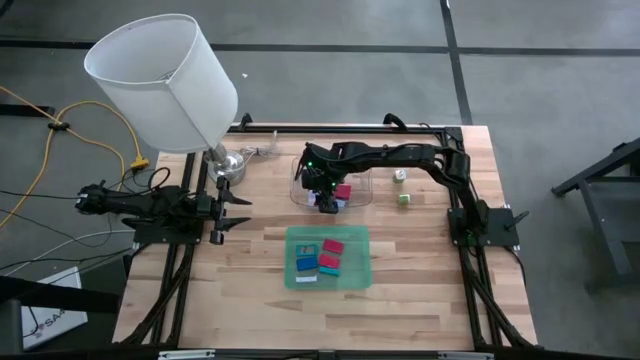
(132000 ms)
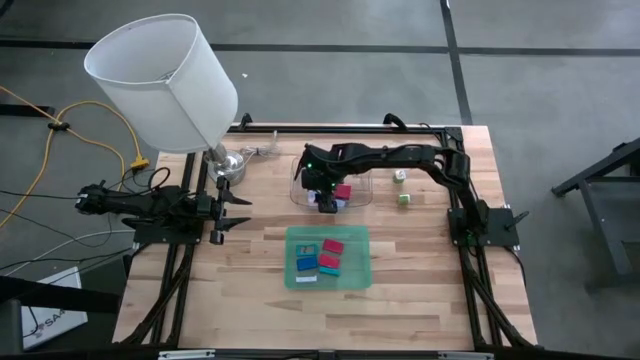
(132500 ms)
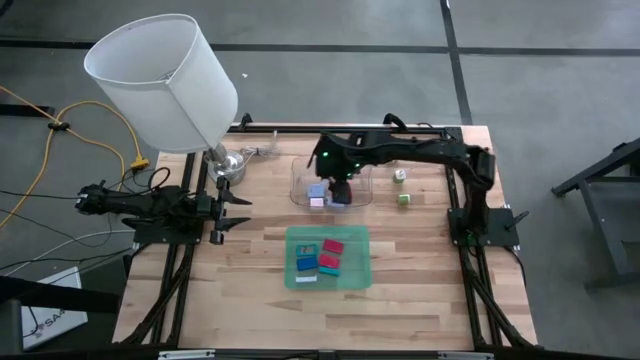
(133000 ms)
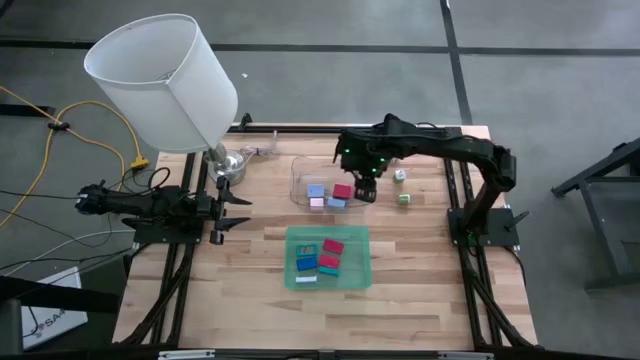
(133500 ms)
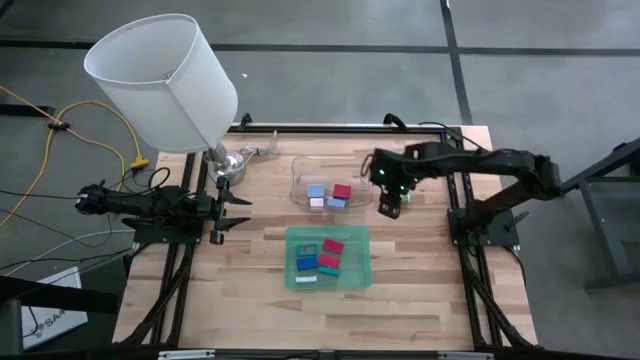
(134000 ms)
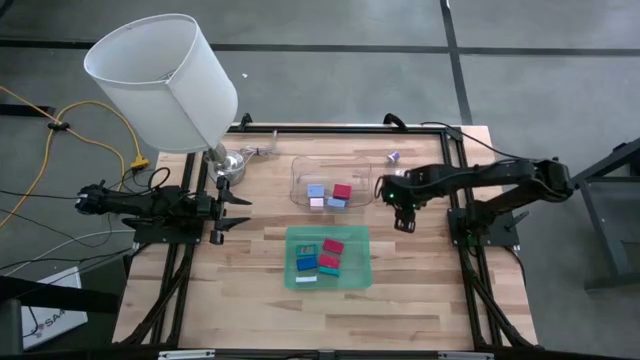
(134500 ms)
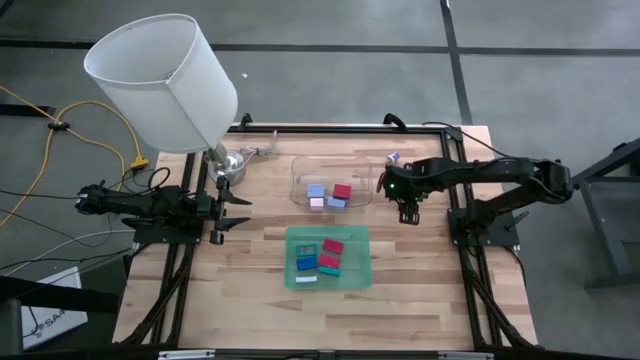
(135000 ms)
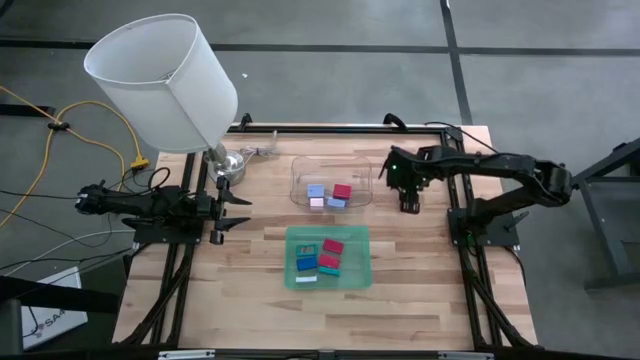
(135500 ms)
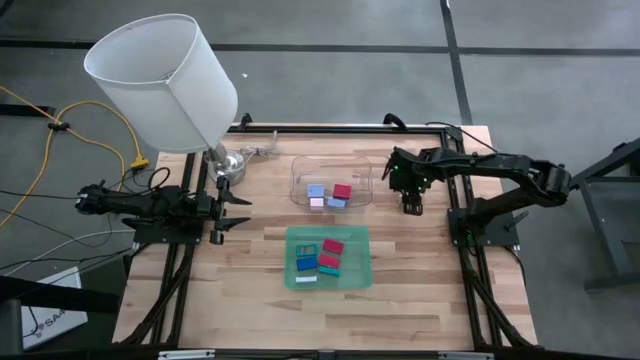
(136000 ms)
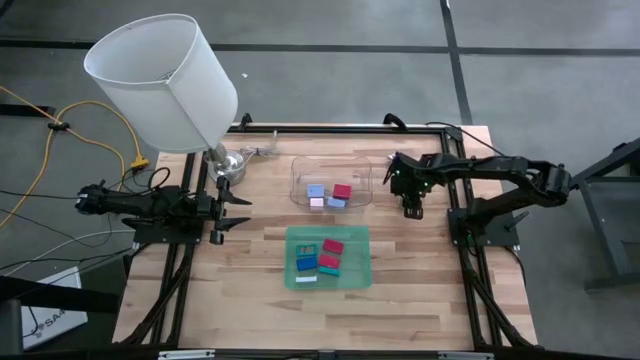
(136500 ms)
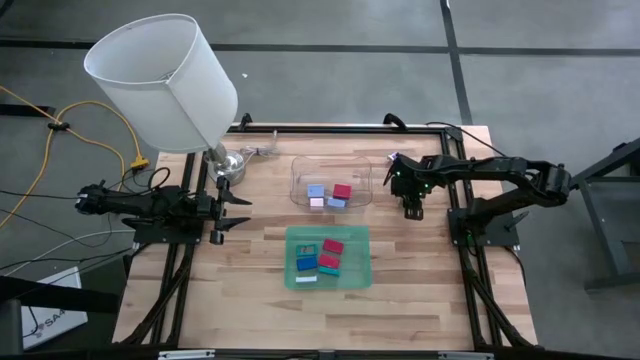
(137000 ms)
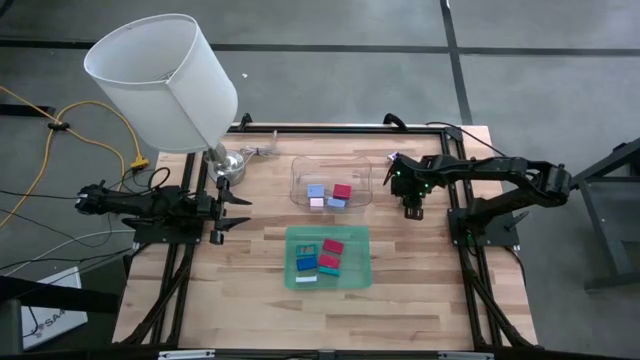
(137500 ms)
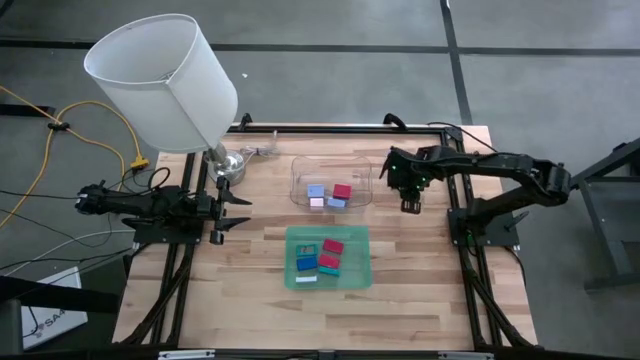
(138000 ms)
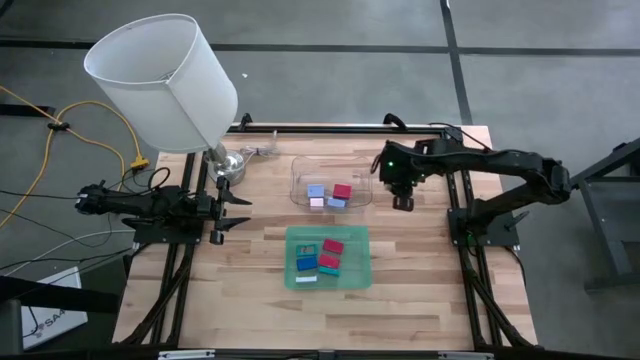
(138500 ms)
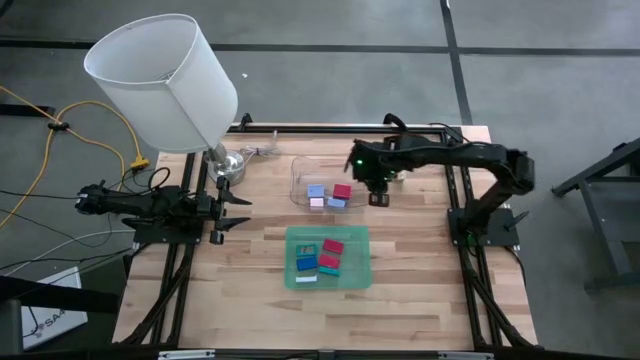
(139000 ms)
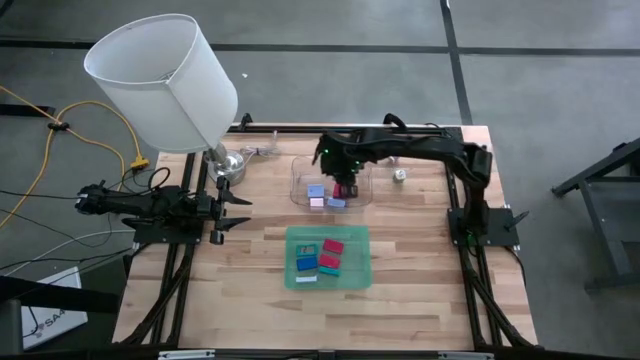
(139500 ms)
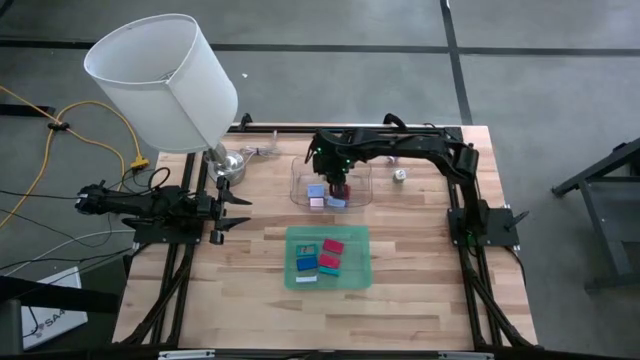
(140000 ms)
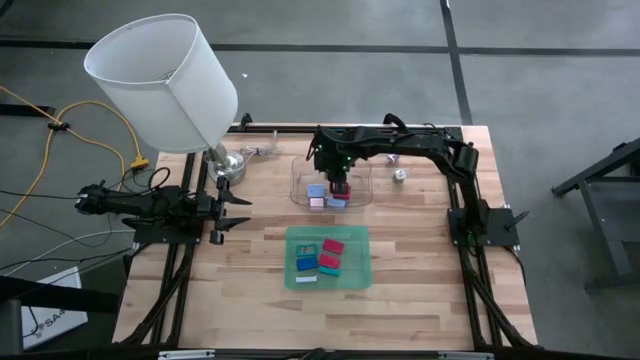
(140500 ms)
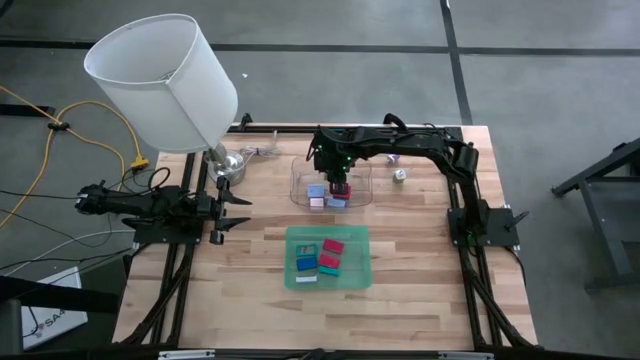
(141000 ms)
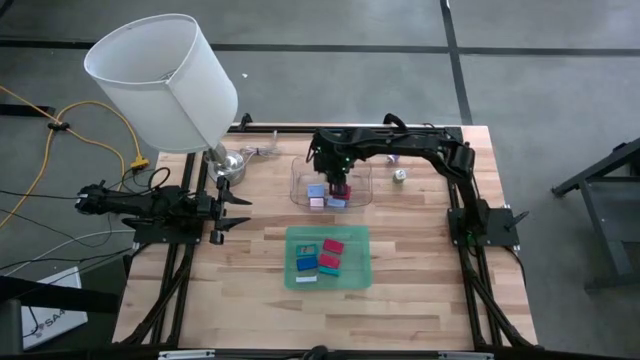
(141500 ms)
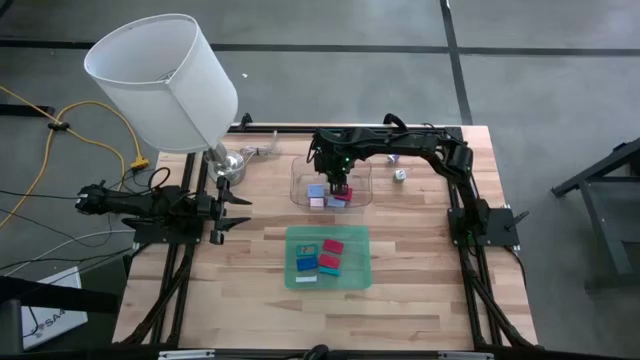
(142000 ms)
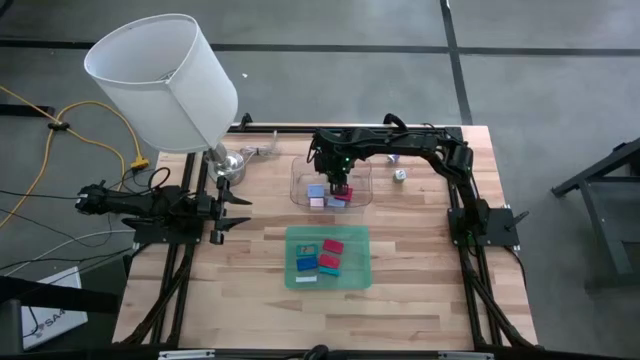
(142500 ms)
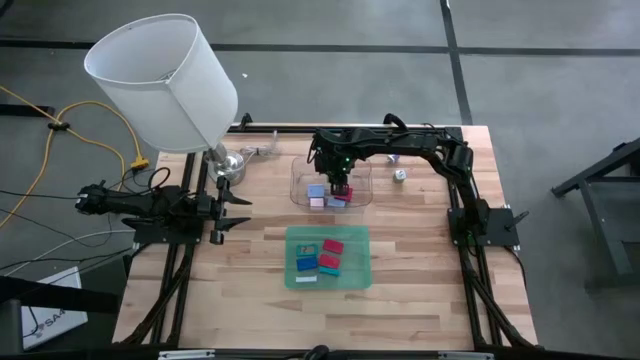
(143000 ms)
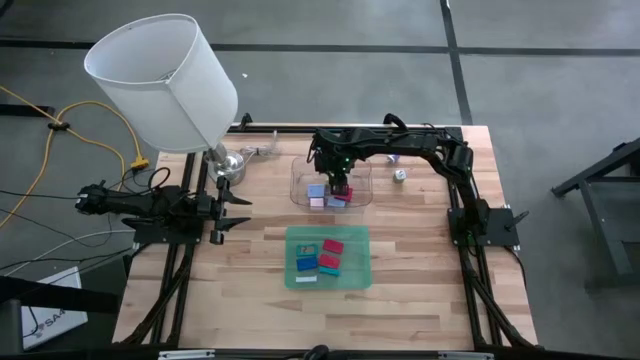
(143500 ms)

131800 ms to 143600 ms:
Task: Pick & Place Office items
Put the bottom green charger adapter into transparent bin

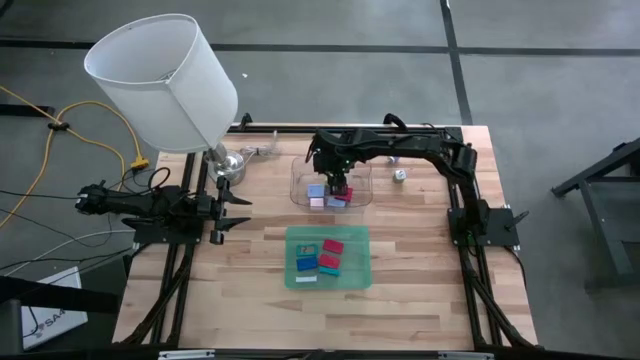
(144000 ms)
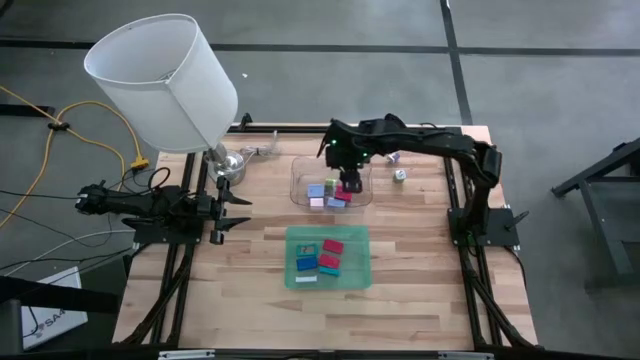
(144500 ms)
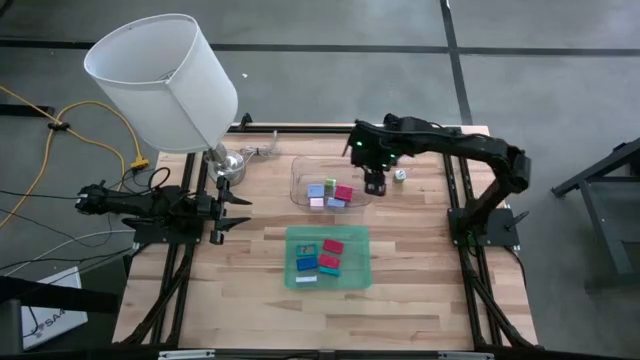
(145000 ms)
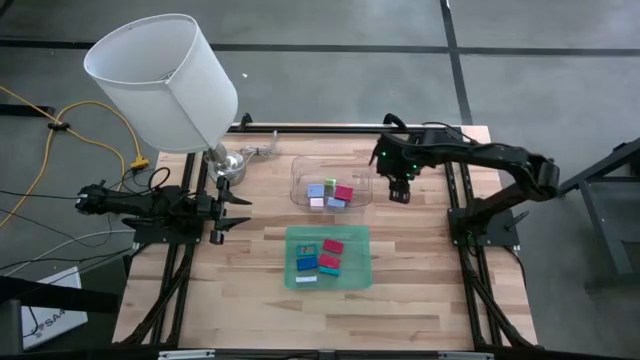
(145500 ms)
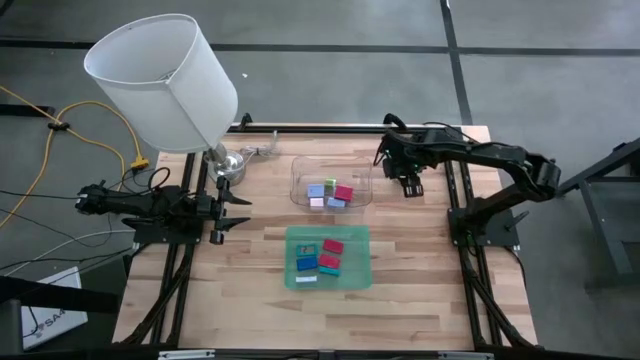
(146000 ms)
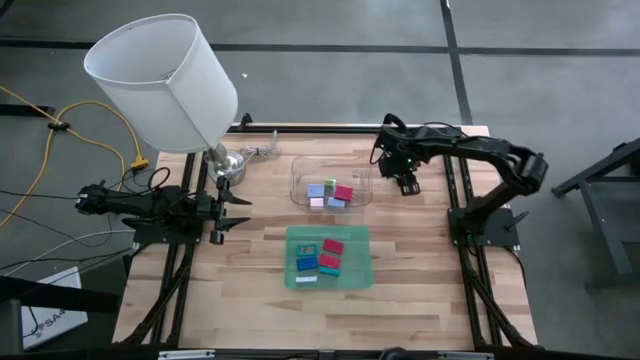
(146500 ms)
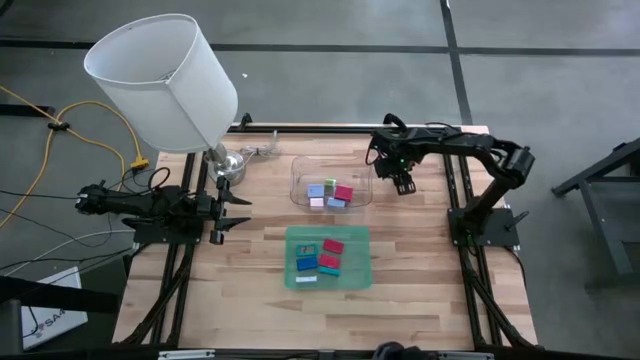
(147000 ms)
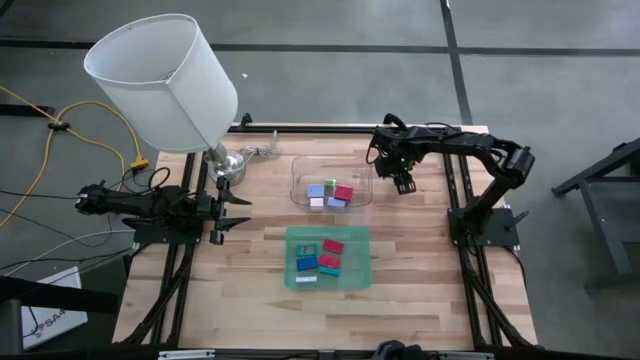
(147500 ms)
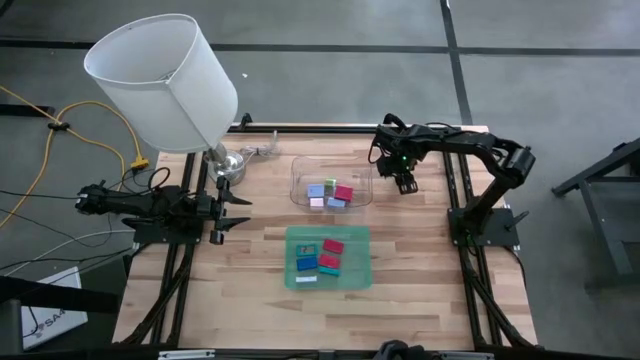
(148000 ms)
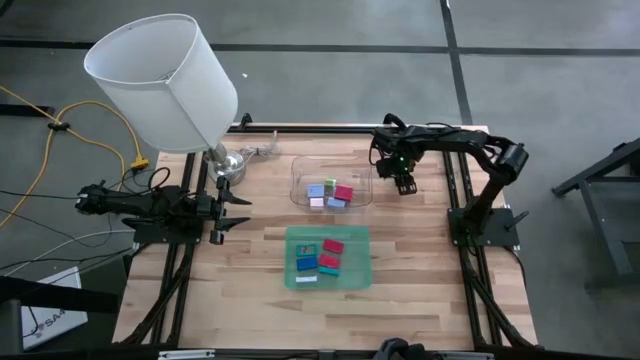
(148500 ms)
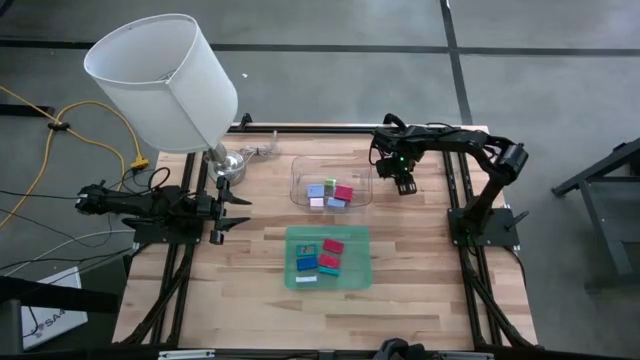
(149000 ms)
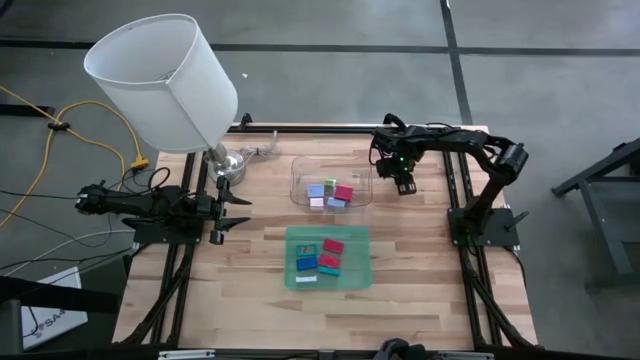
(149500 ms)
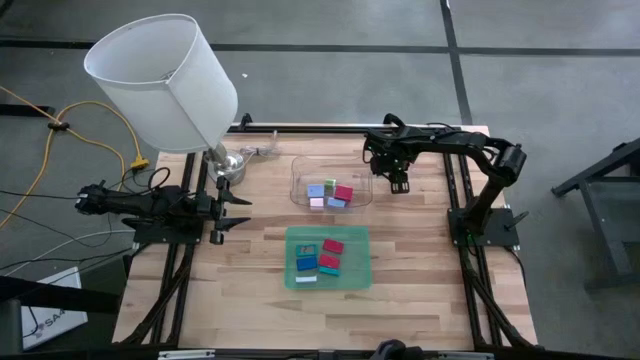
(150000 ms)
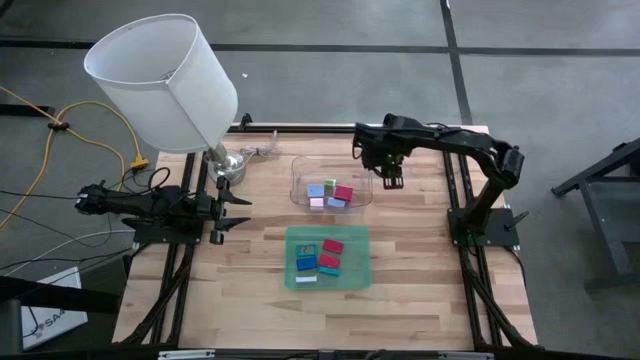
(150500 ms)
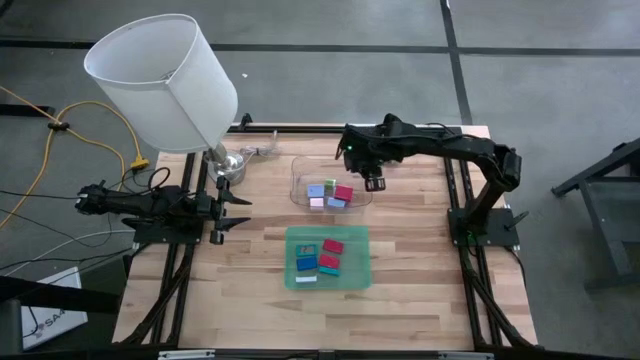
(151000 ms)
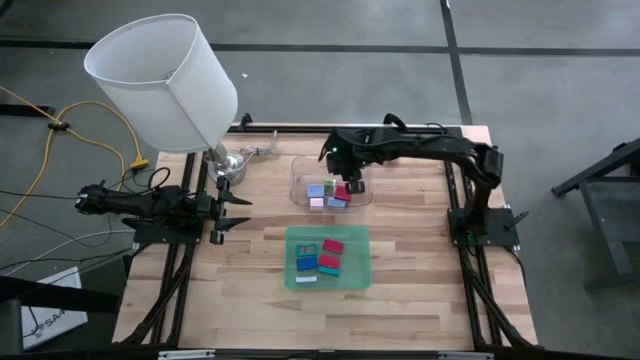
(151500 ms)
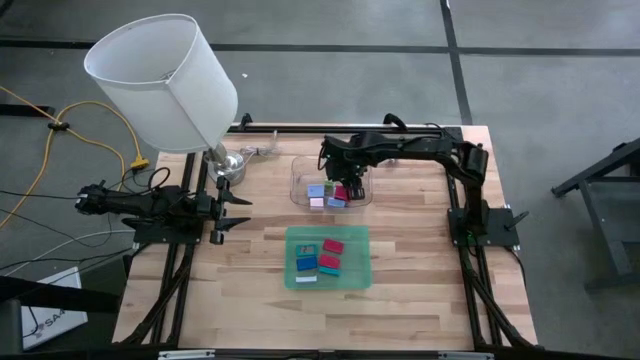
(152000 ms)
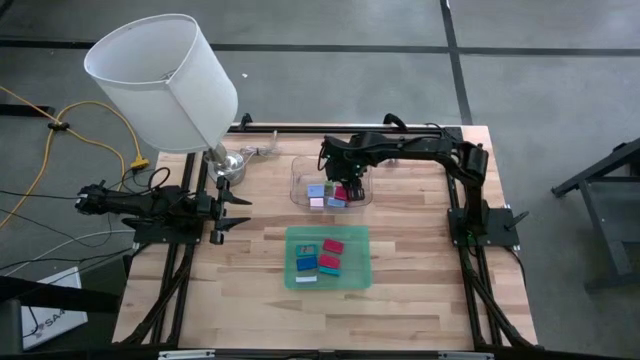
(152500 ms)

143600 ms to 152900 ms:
Put the green charger adapter into transparent bin
